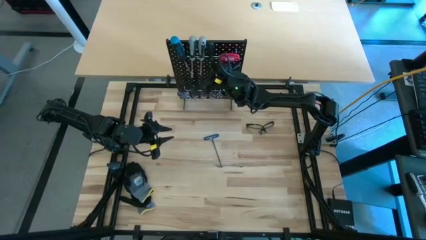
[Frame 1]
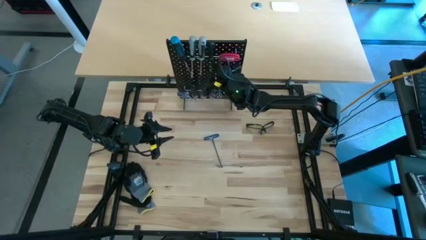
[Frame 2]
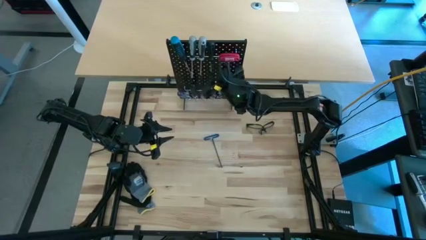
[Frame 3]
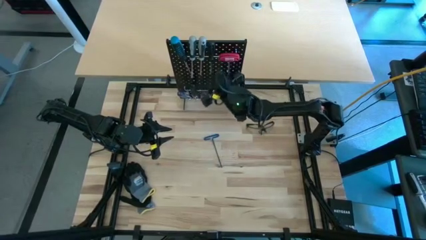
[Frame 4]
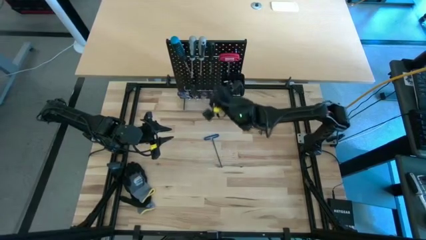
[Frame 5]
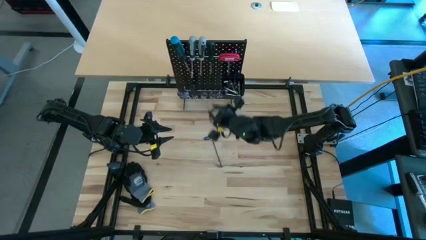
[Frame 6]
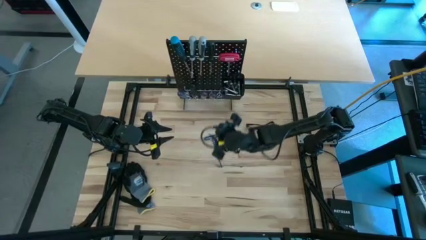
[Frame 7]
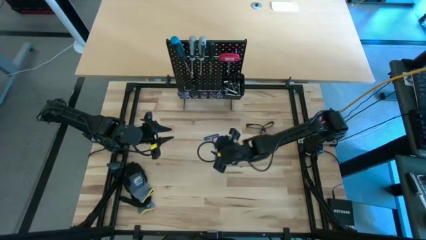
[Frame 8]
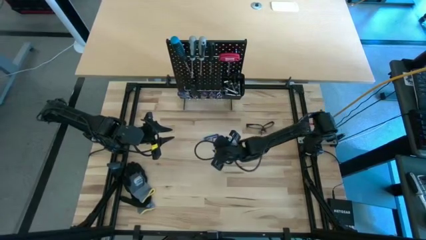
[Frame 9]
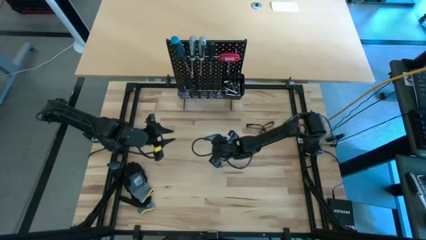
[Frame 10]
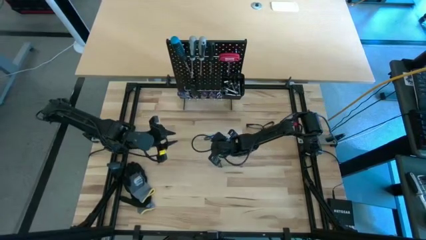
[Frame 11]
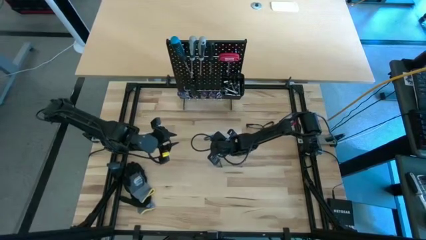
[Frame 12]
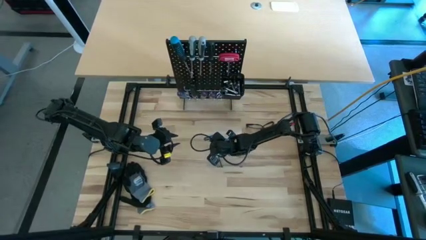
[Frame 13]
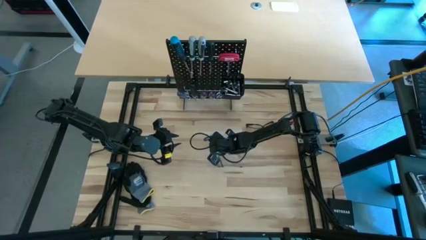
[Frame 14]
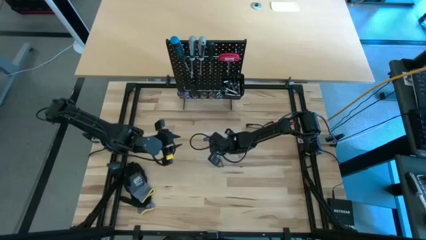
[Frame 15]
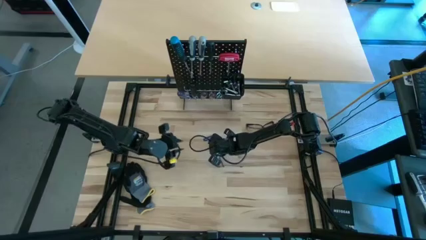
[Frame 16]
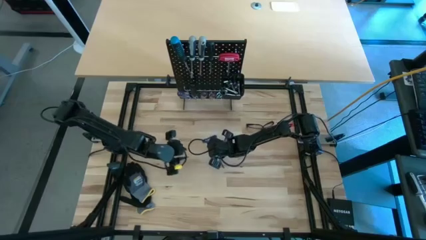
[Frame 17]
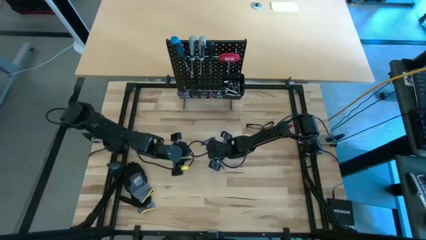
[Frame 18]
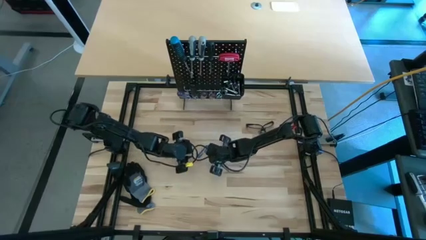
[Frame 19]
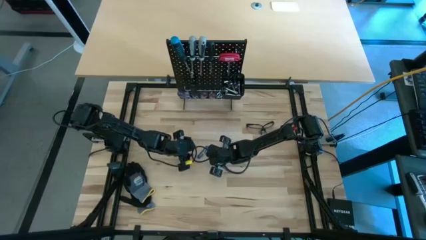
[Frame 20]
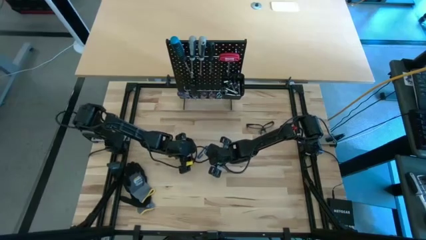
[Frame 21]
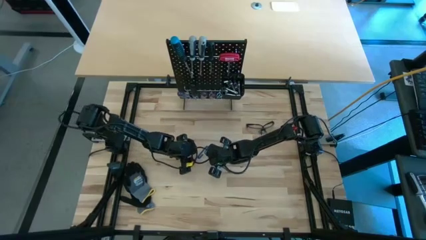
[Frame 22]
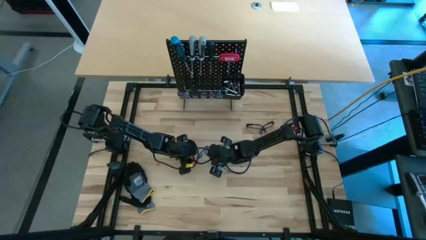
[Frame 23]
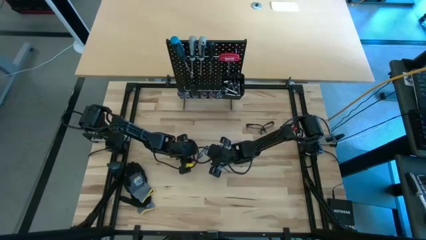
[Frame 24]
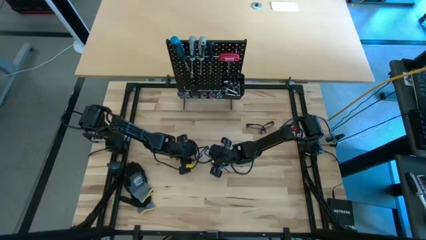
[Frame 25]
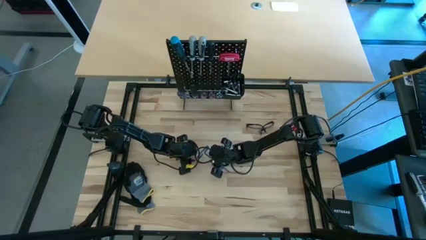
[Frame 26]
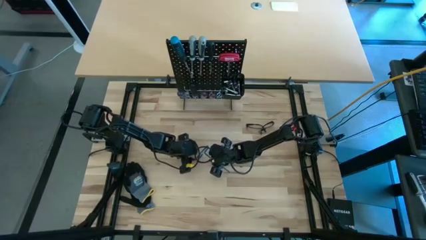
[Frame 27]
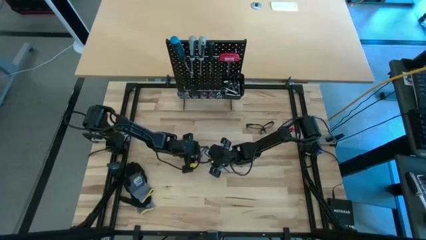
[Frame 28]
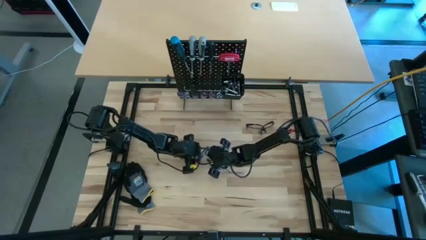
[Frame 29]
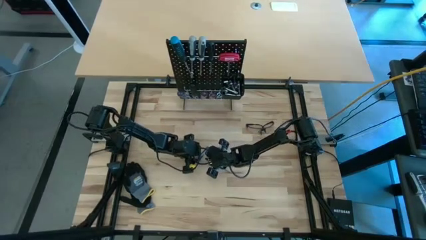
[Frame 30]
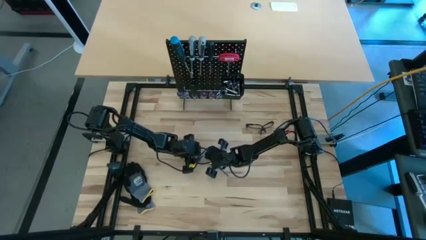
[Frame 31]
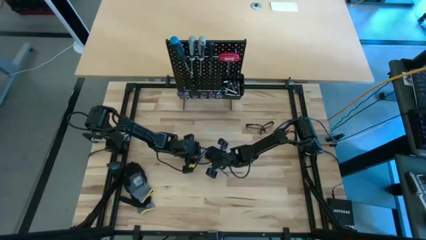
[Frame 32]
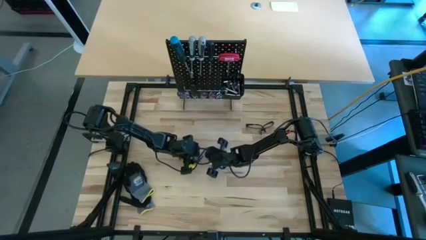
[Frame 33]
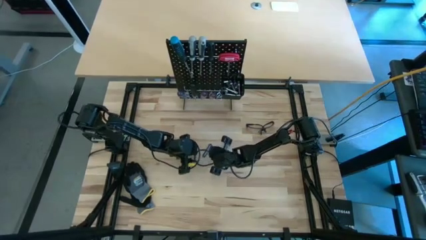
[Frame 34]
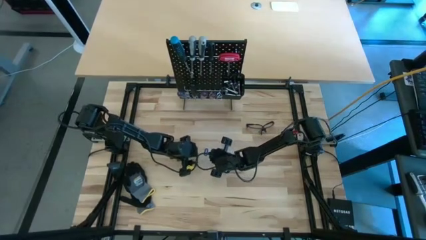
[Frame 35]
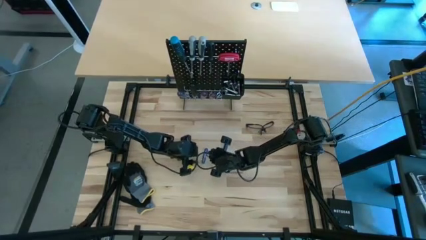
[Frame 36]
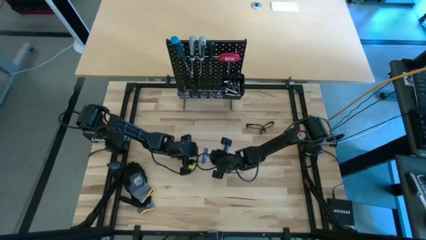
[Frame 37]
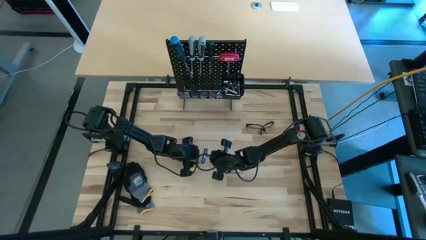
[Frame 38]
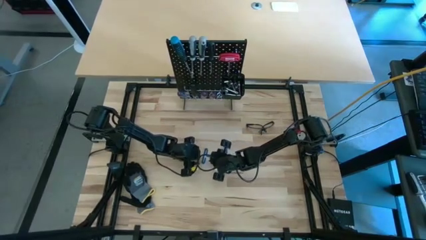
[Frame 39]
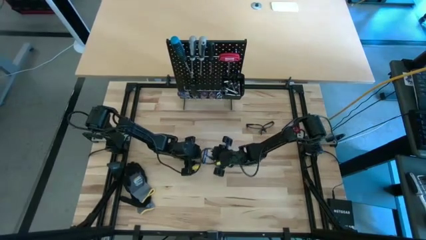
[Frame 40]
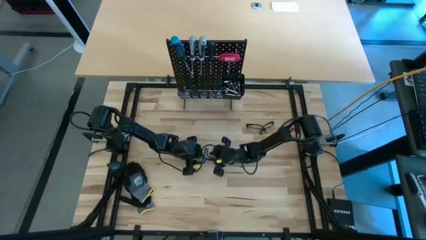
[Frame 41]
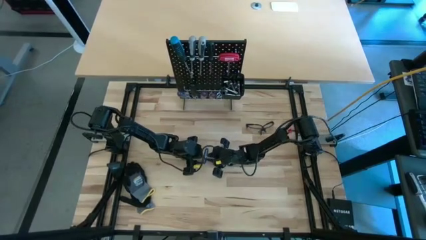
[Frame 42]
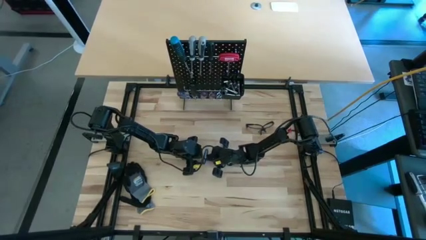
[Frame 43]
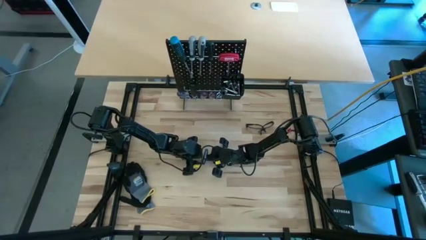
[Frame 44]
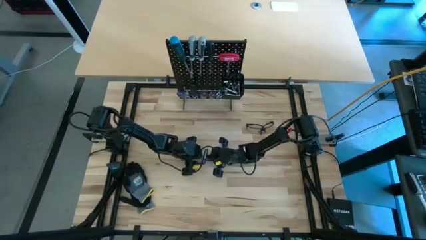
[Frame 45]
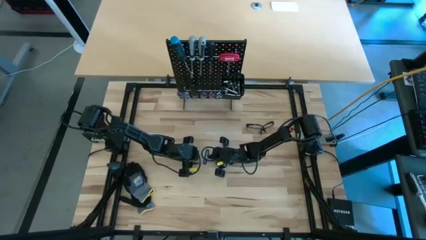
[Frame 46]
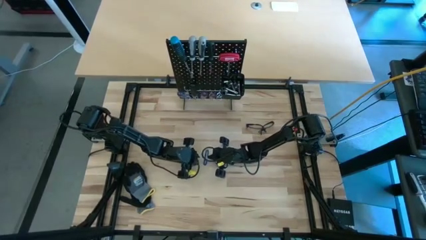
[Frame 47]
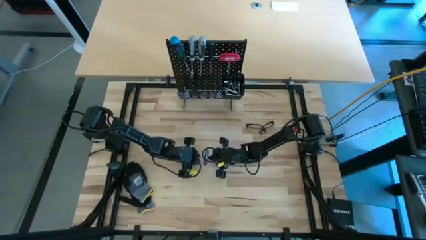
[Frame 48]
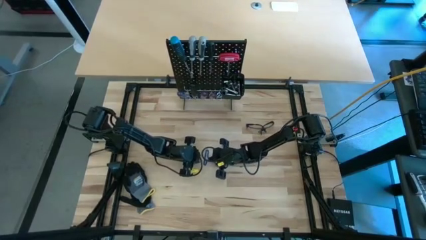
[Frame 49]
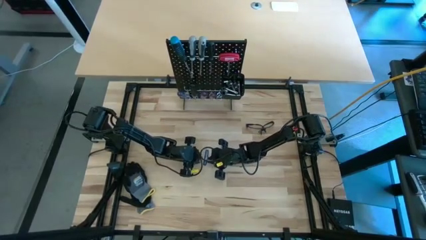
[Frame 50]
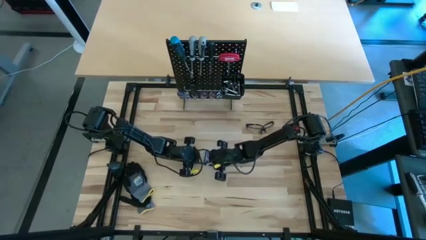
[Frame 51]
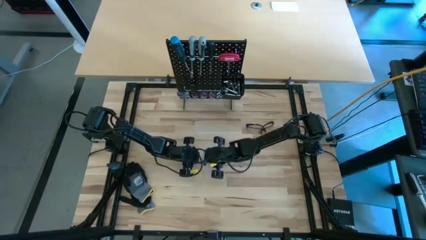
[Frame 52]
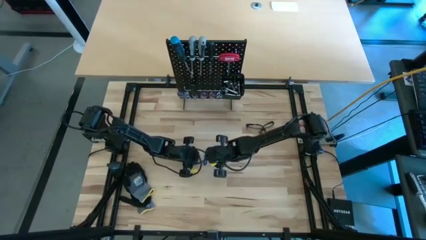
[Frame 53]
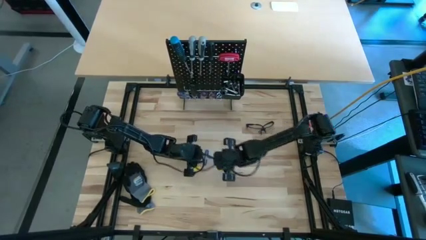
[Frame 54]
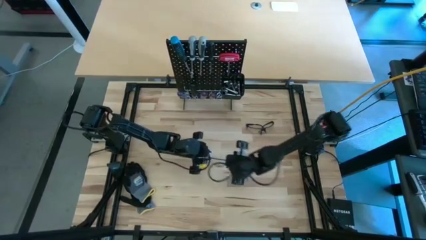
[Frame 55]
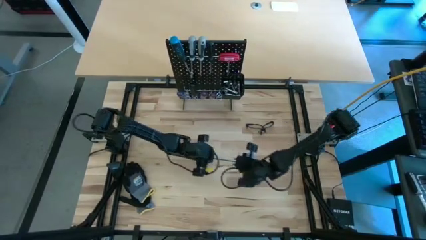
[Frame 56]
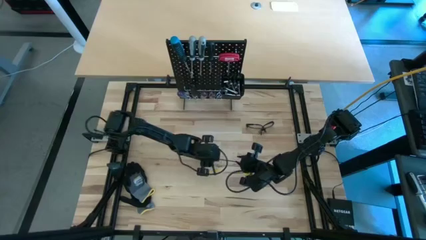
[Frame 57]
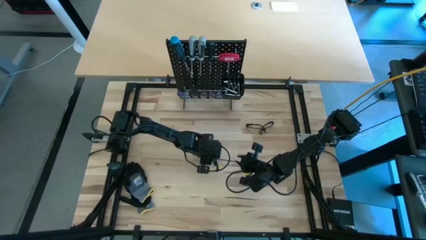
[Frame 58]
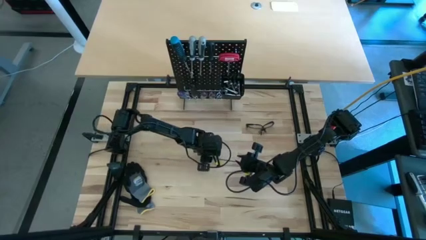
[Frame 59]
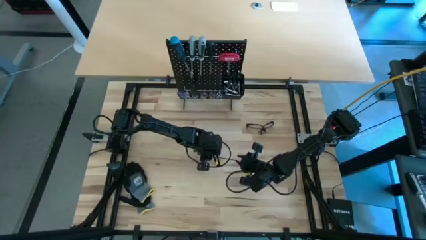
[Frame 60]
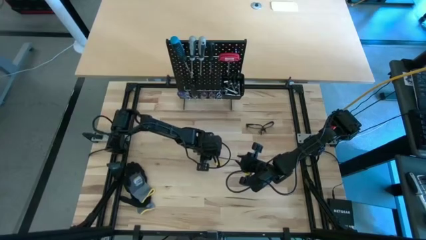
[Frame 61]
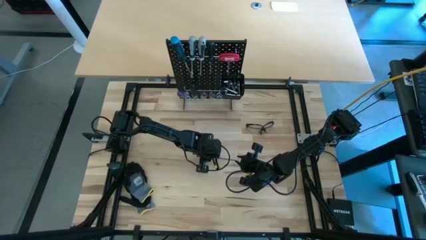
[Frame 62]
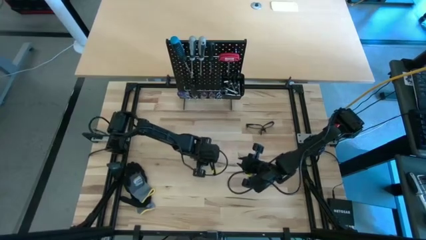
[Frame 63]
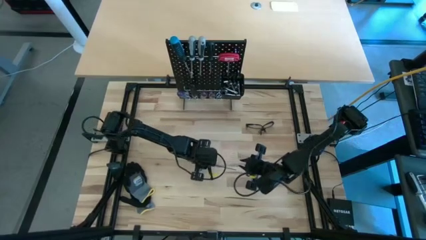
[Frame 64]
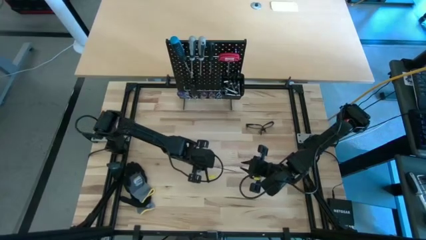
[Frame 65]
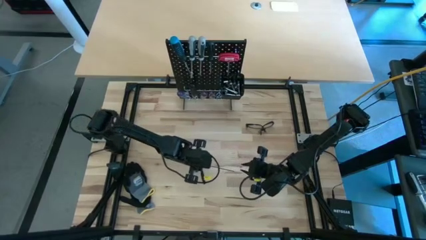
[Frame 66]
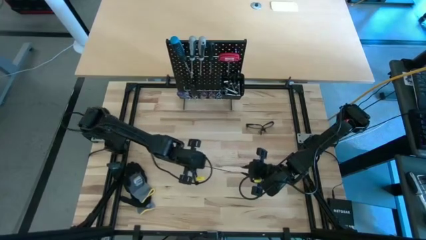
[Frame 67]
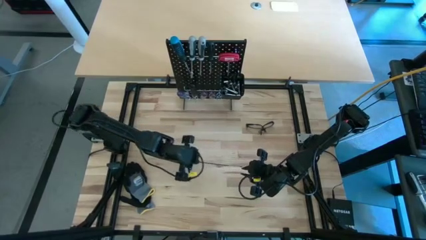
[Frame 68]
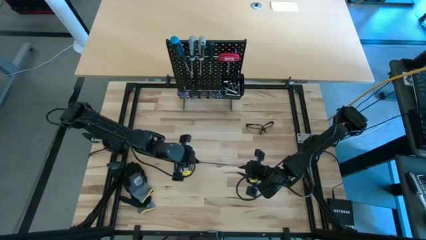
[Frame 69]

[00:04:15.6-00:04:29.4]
Task: Hang tools onto peg board
Hang the blue pick tool on the peg board
